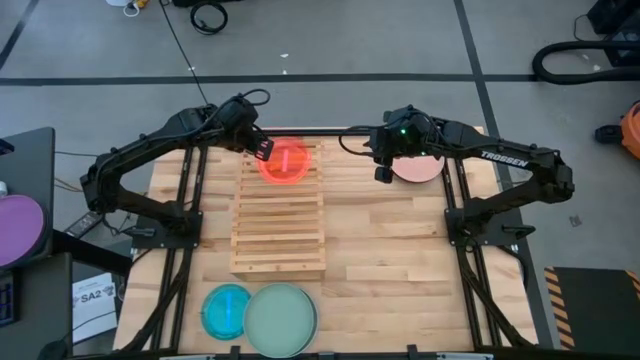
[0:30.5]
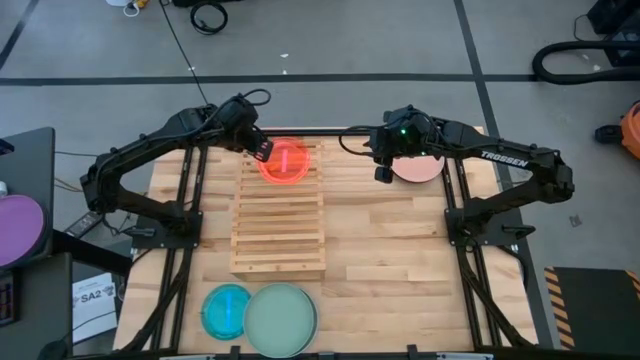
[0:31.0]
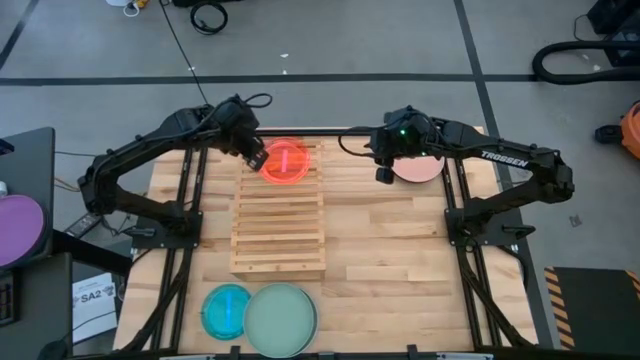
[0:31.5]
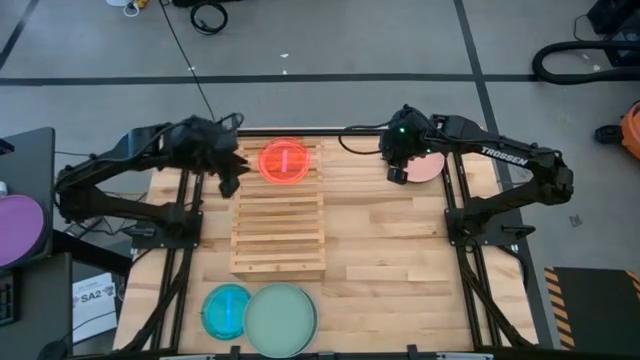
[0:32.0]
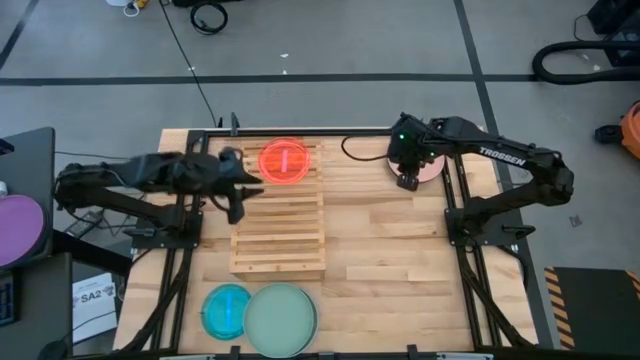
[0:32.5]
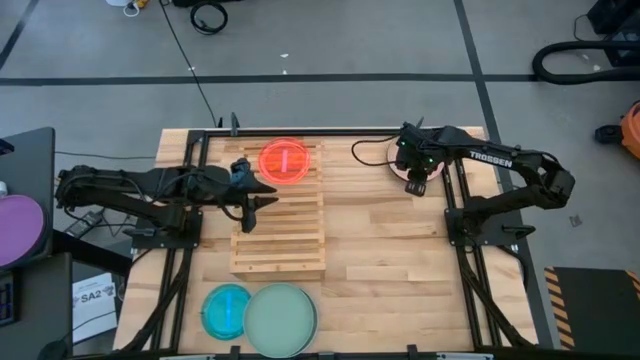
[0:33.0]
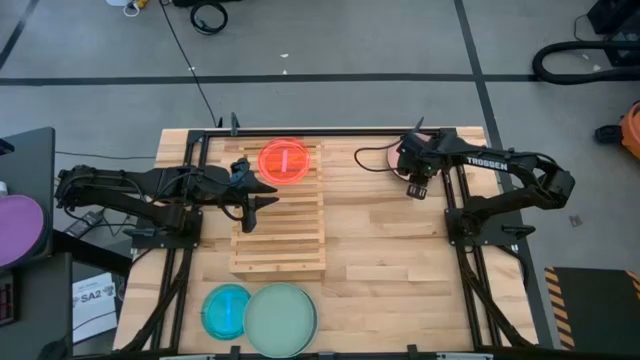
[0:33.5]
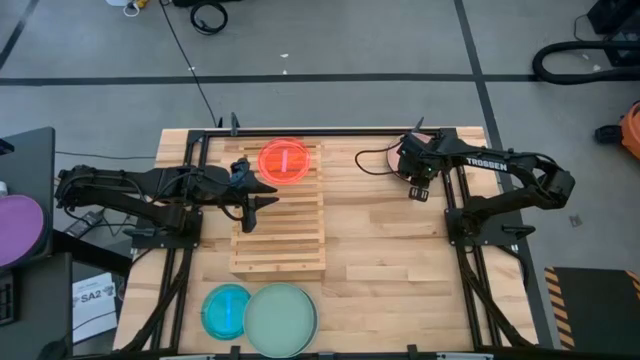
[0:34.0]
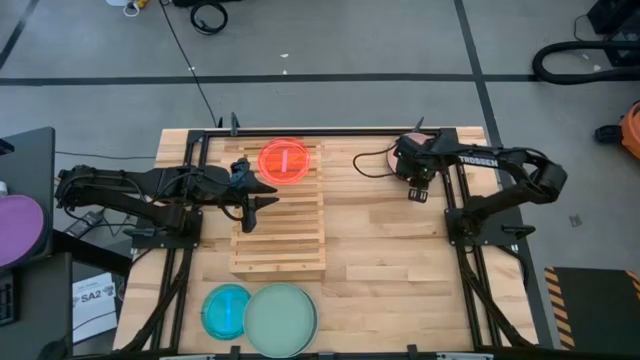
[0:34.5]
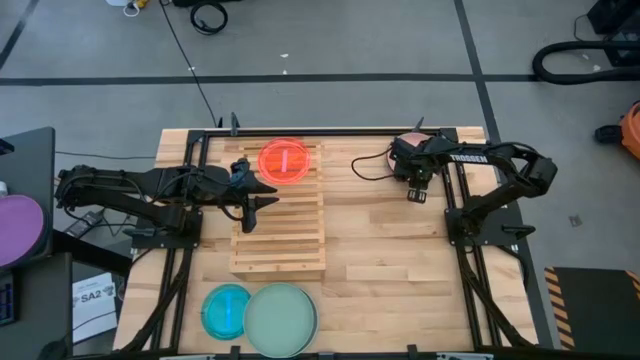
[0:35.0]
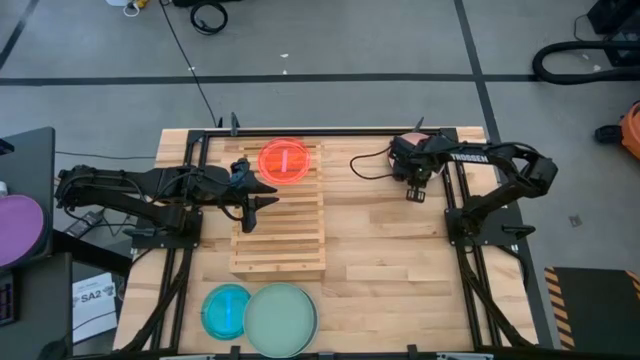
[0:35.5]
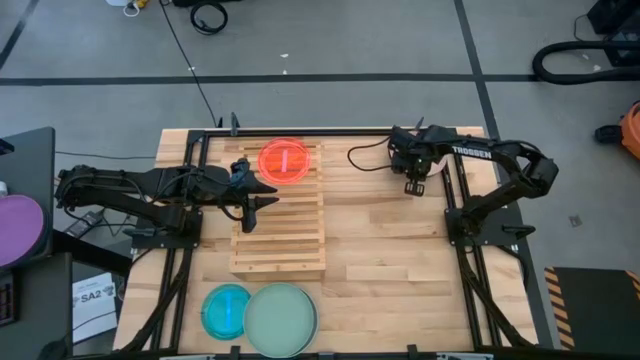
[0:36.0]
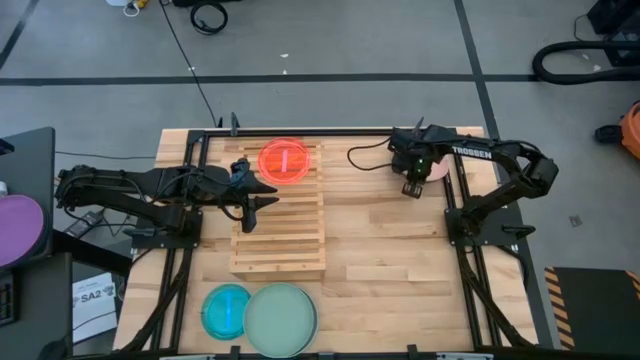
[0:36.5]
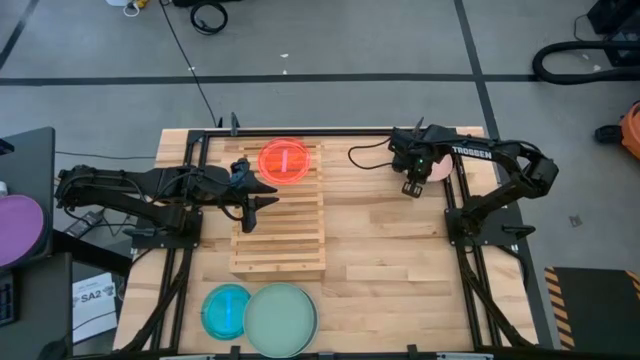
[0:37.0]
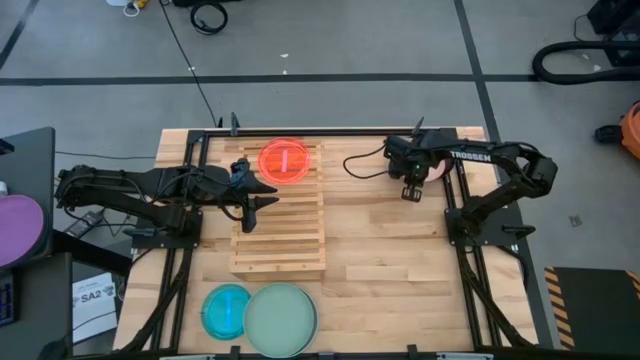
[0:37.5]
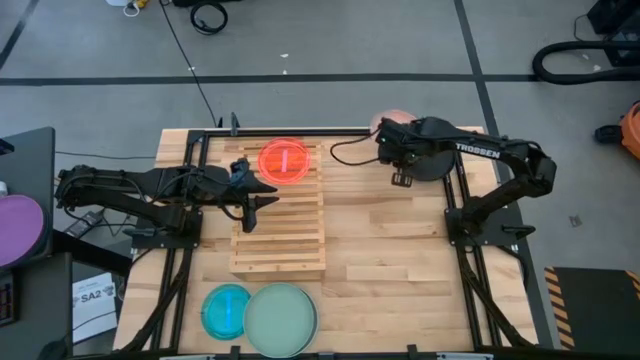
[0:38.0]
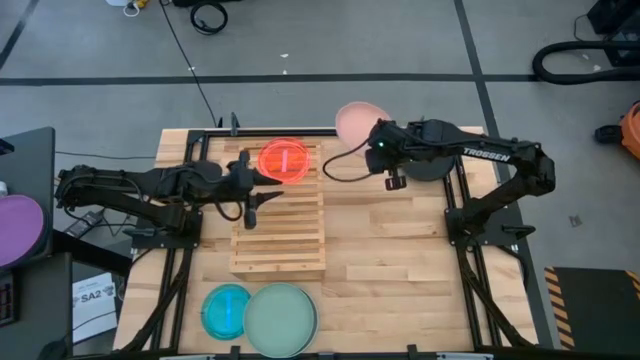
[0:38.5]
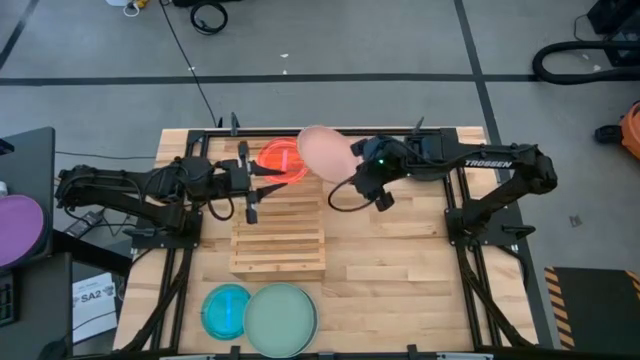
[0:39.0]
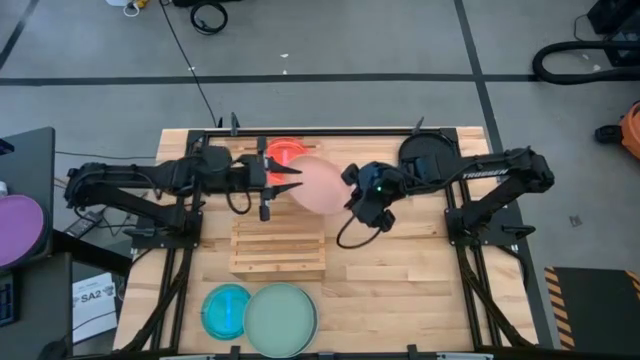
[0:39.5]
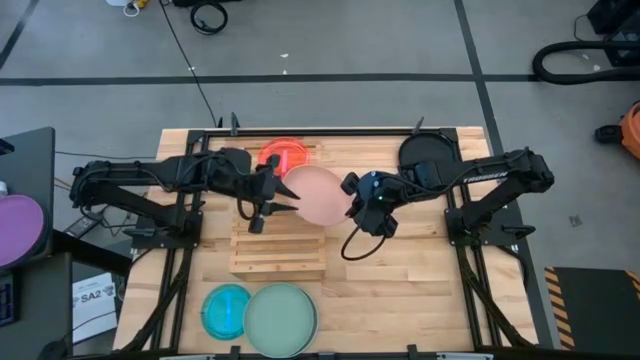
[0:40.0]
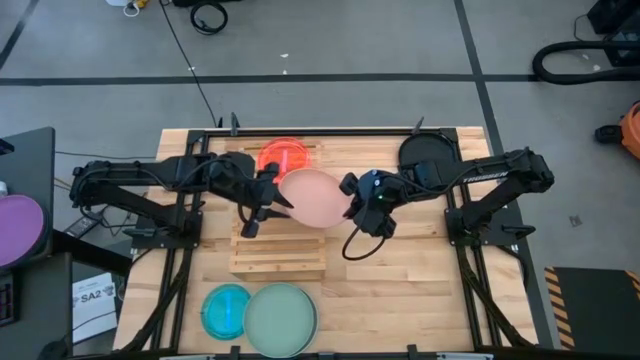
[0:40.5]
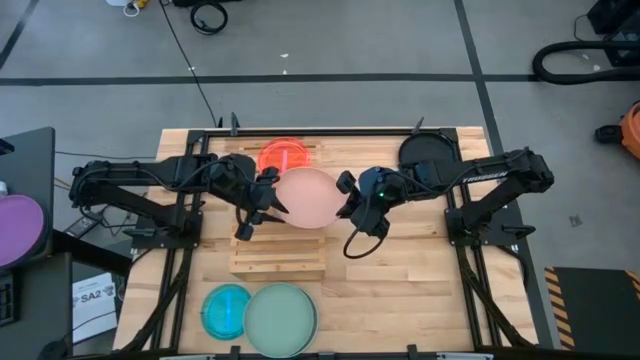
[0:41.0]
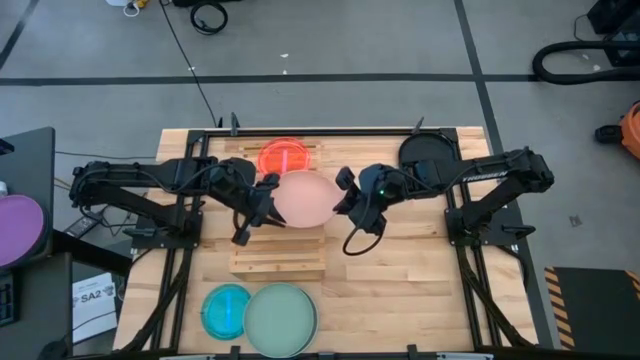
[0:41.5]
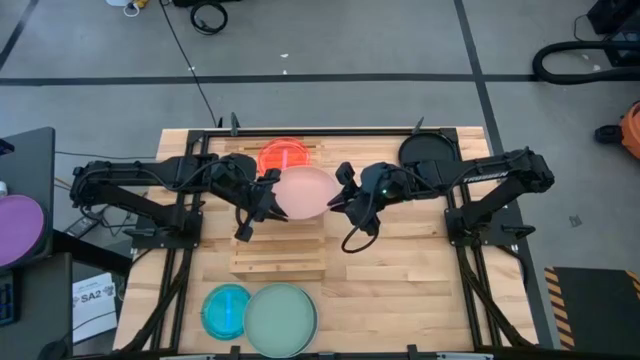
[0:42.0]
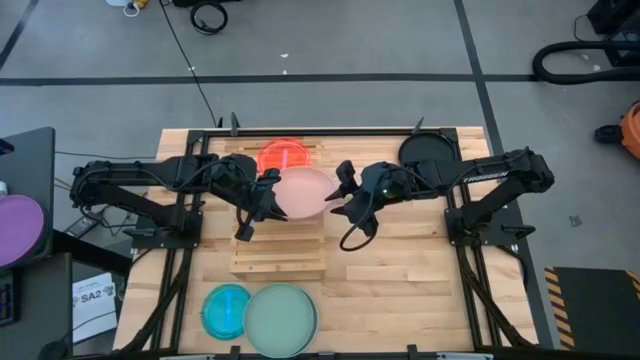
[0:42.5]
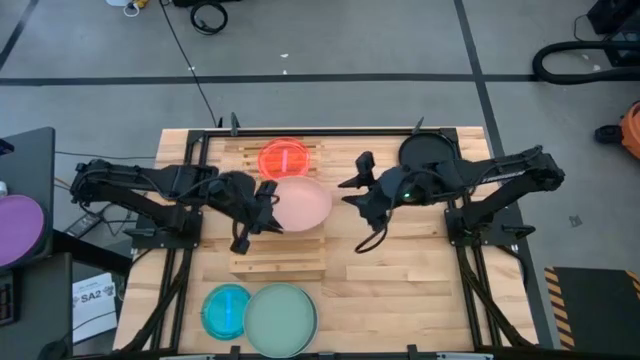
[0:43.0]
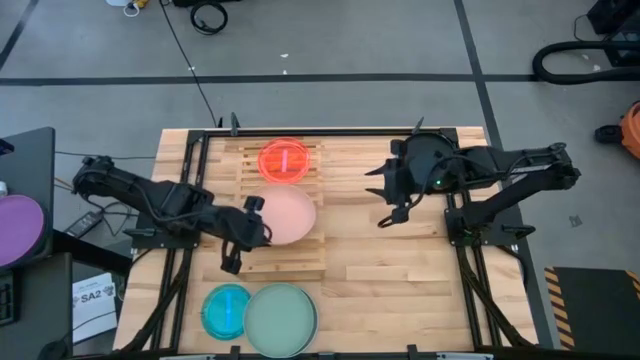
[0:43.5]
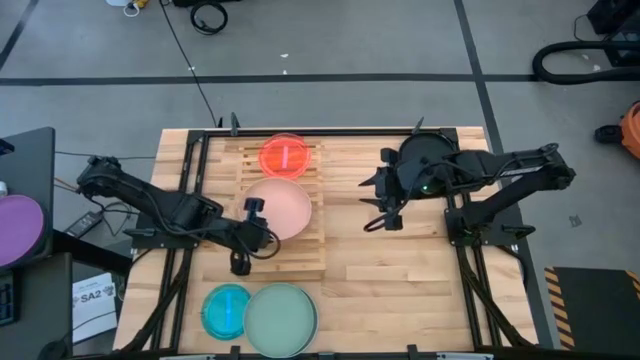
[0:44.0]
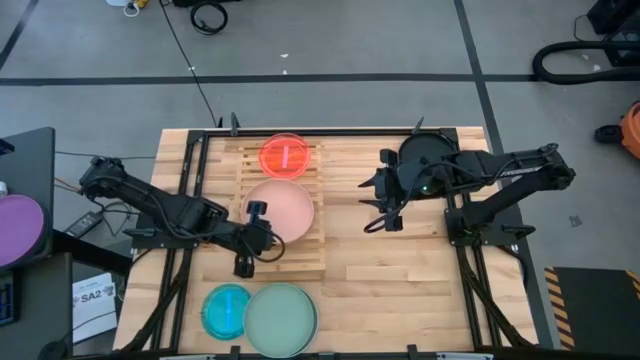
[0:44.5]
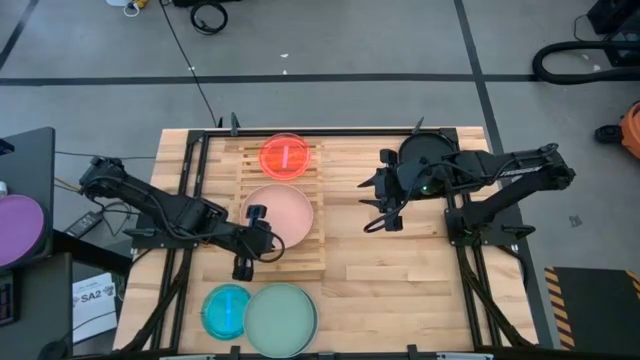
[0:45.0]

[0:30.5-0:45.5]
Task: Place and stack plates onto a shelf
Put the light brown plate on the shelf

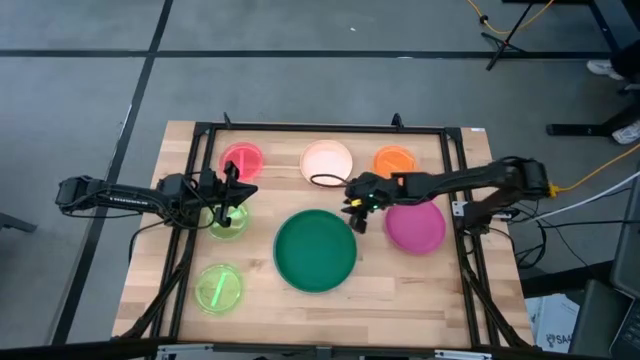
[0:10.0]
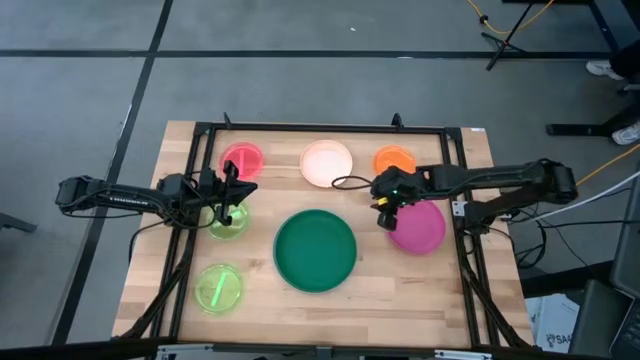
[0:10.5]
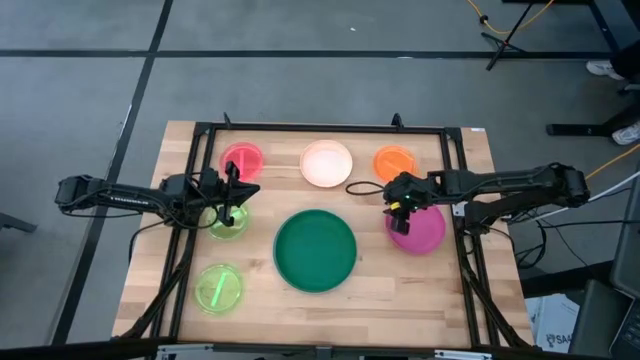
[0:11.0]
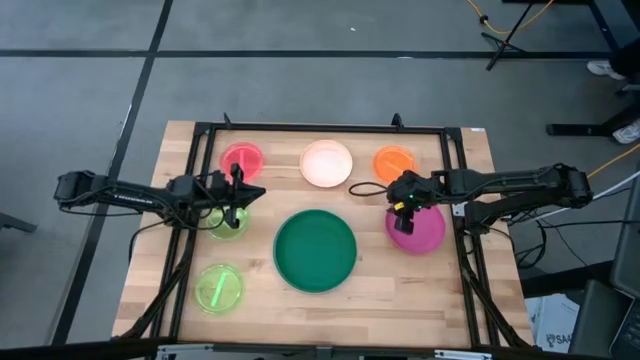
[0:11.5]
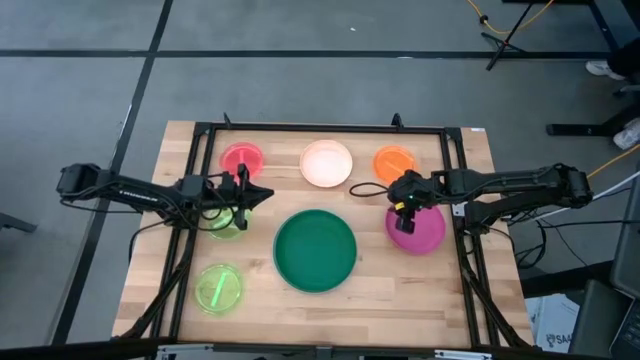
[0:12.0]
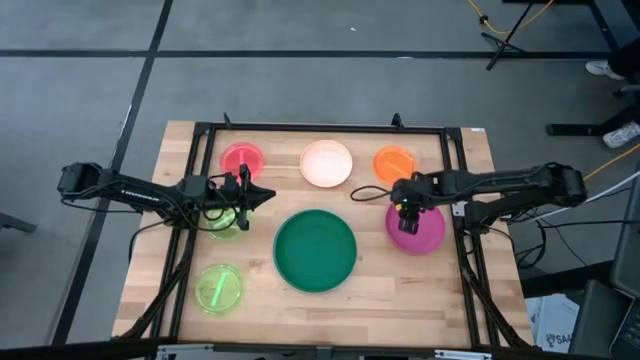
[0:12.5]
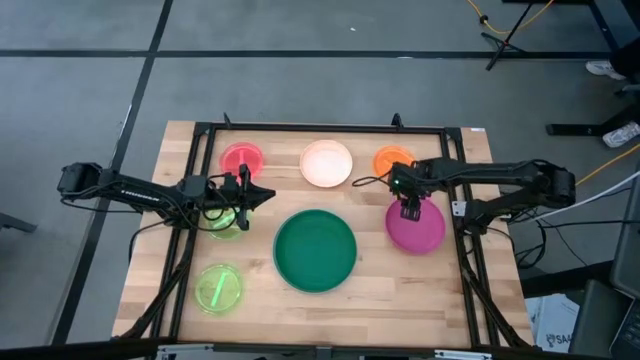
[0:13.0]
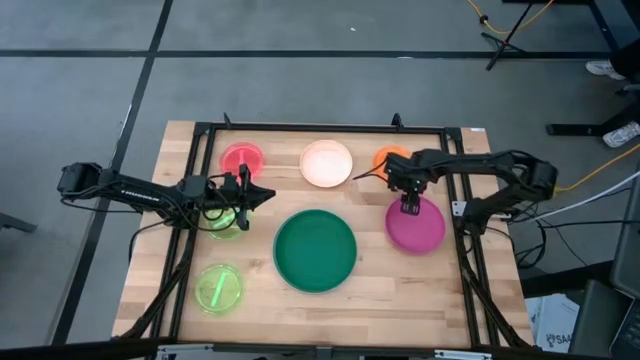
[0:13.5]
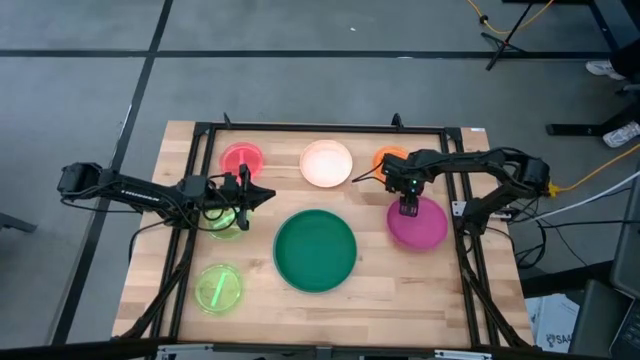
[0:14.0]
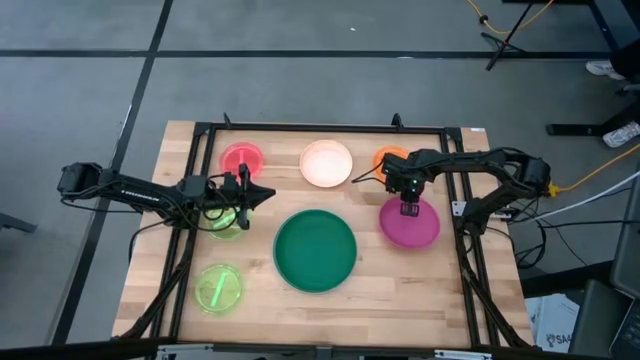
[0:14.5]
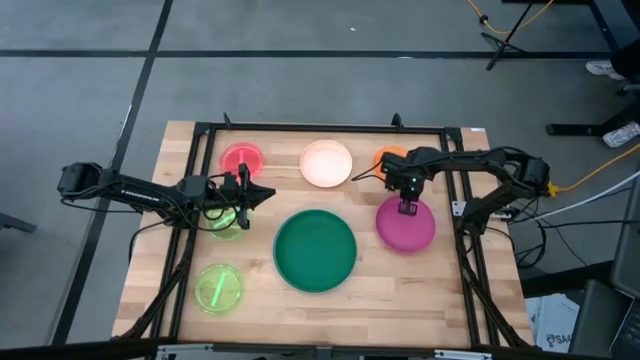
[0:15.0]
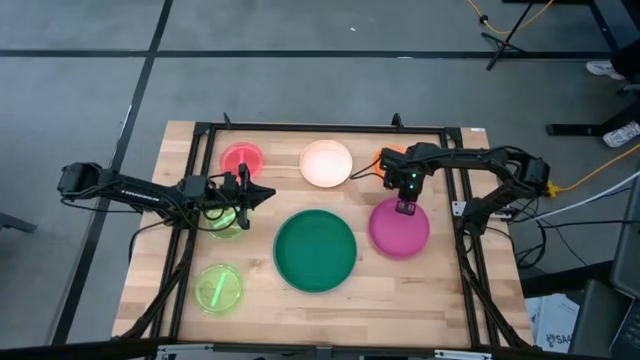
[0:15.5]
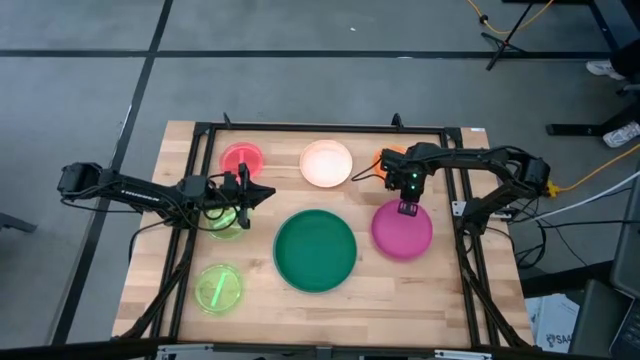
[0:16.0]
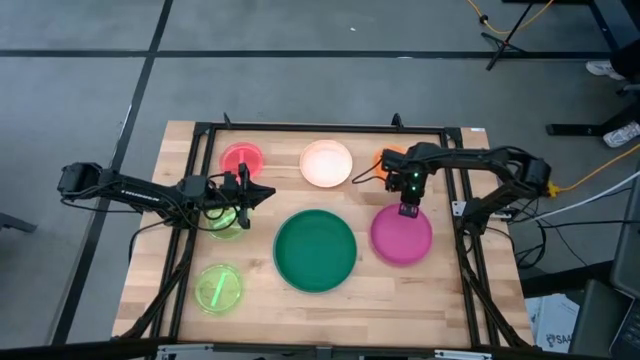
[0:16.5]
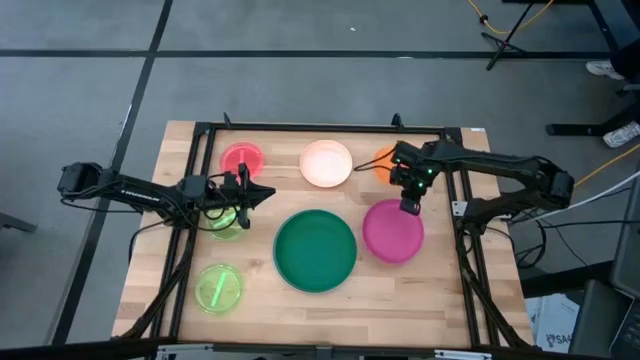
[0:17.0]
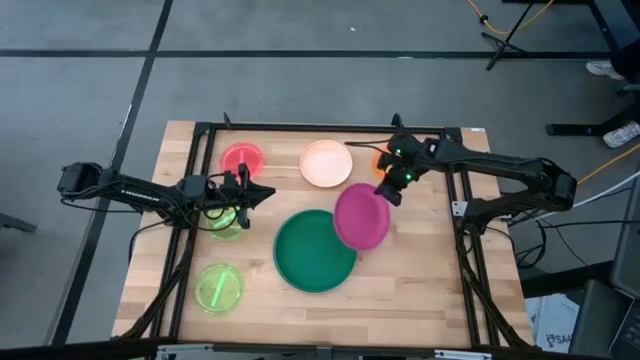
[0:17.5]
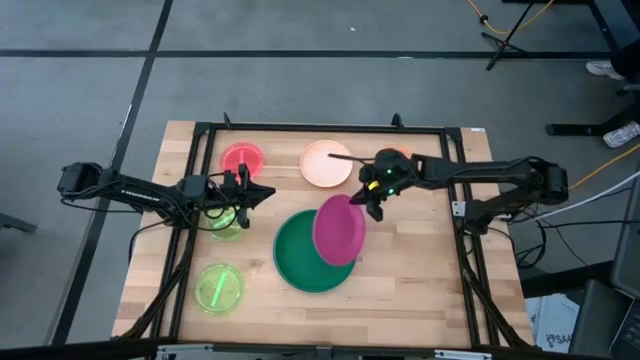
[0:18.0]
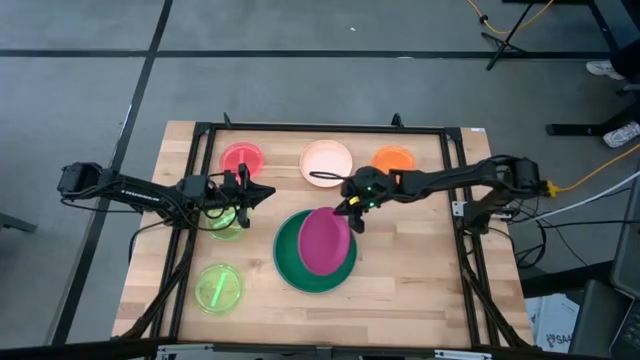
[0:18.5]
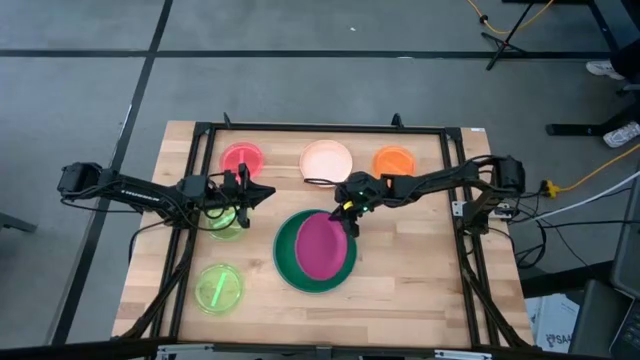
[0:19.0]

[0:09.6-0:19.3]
Task: Stack plastic plates
Stack the pink plate on the stacked plates
